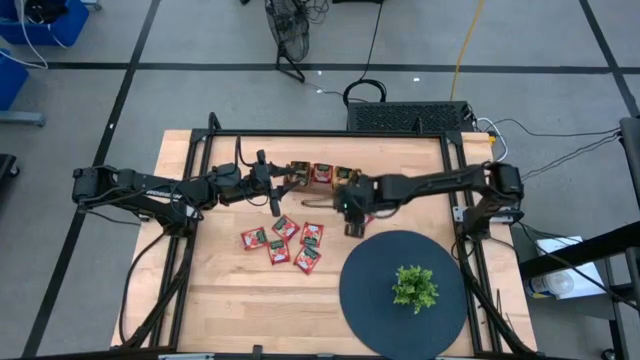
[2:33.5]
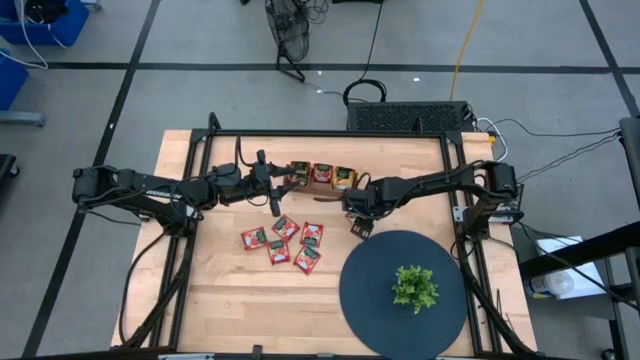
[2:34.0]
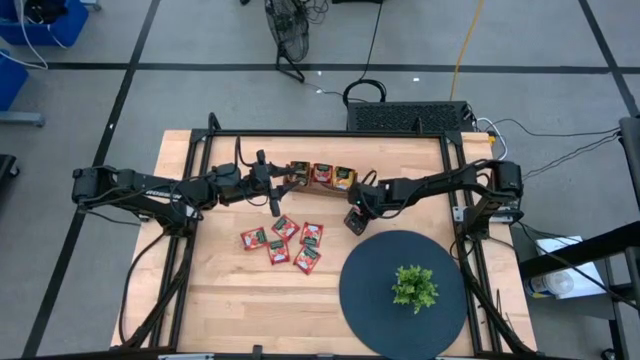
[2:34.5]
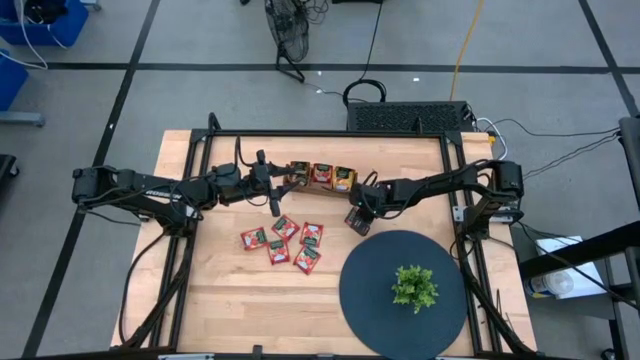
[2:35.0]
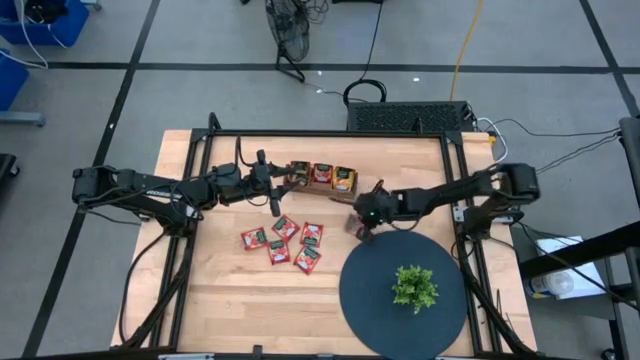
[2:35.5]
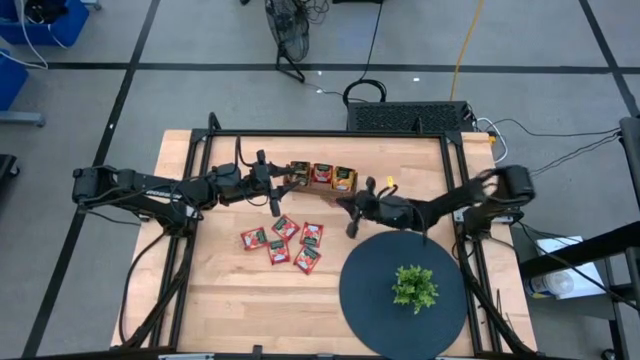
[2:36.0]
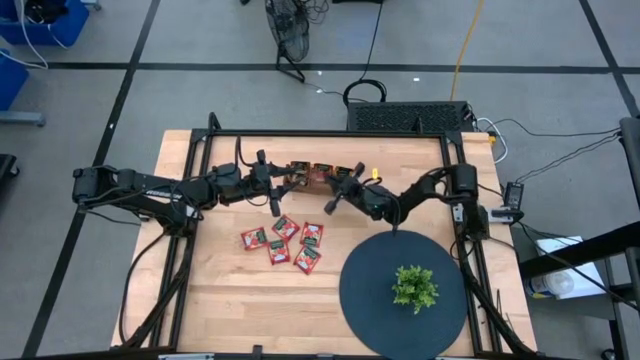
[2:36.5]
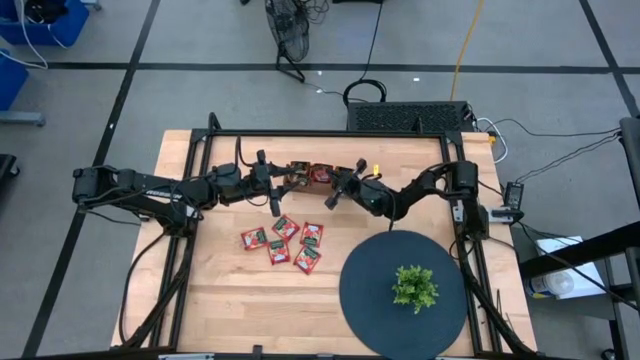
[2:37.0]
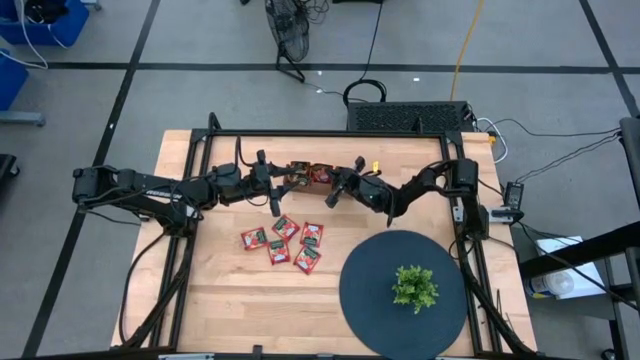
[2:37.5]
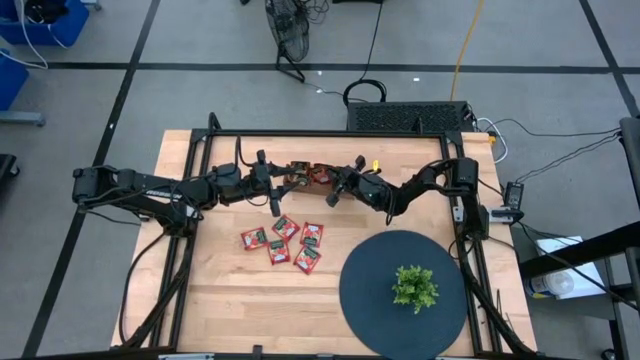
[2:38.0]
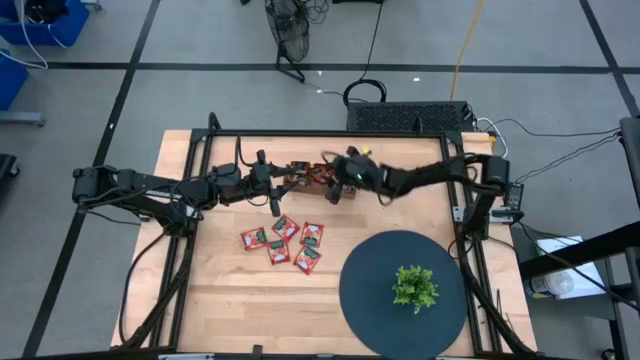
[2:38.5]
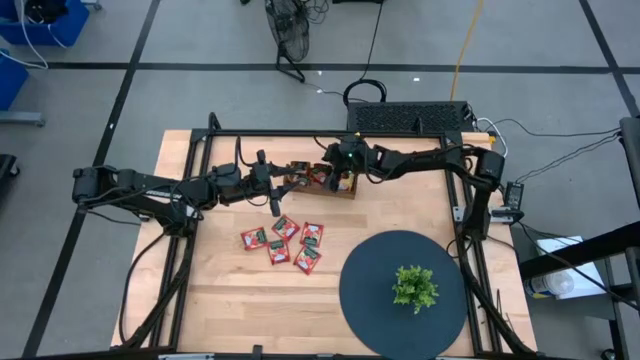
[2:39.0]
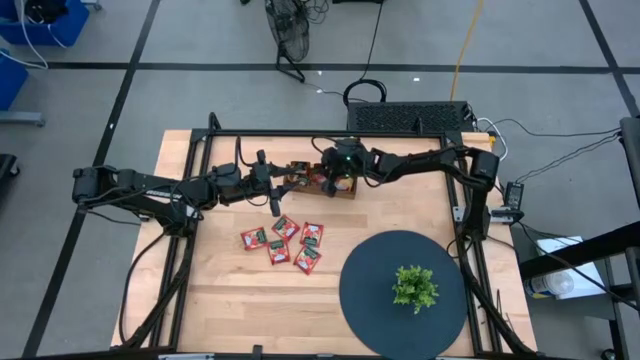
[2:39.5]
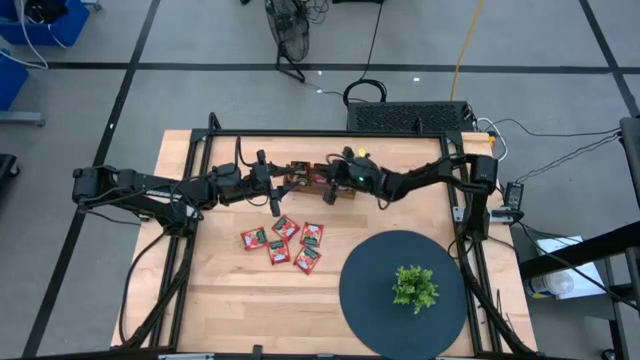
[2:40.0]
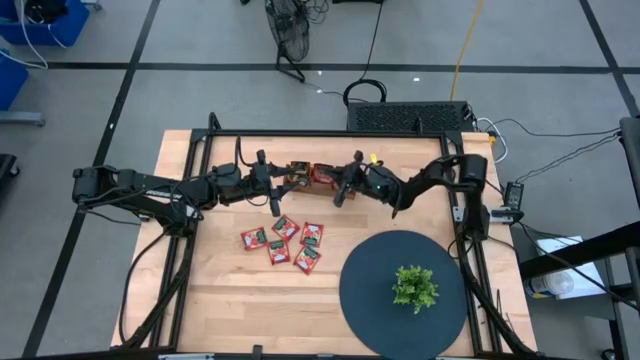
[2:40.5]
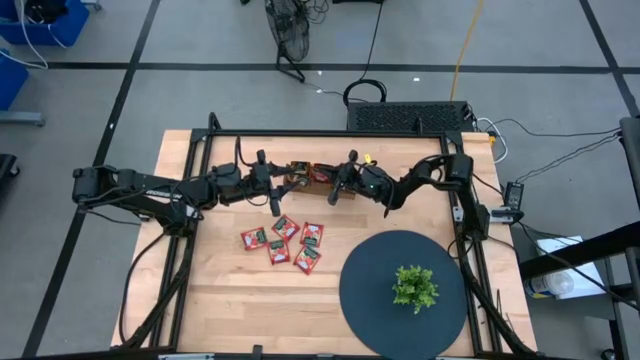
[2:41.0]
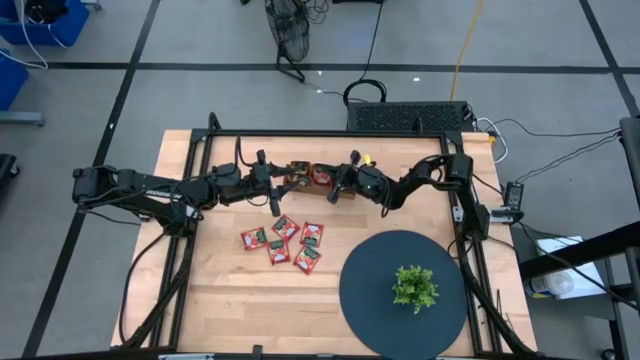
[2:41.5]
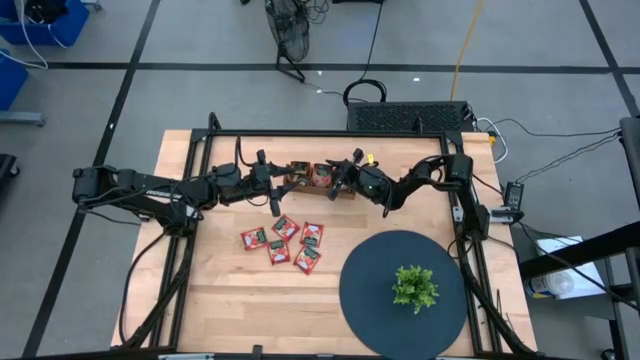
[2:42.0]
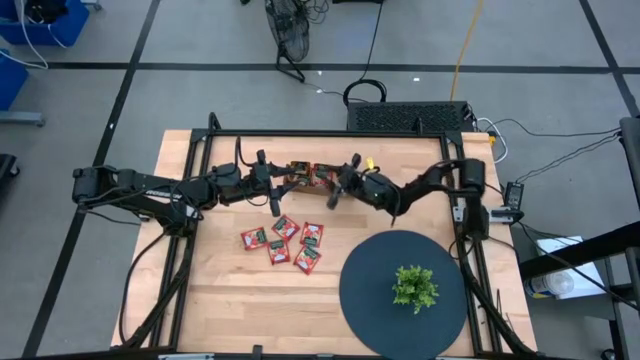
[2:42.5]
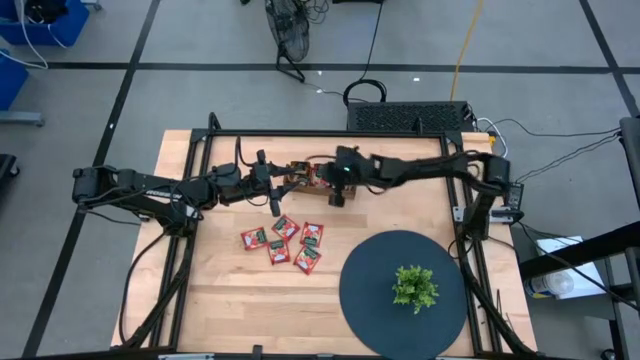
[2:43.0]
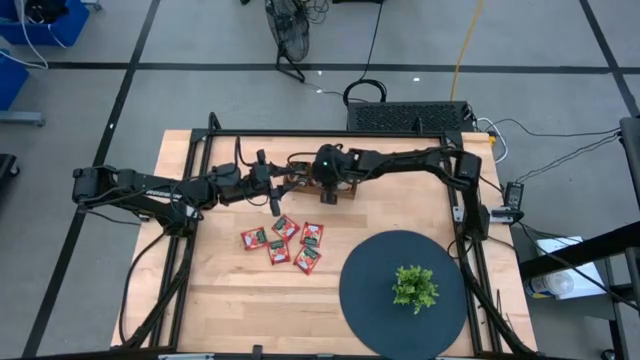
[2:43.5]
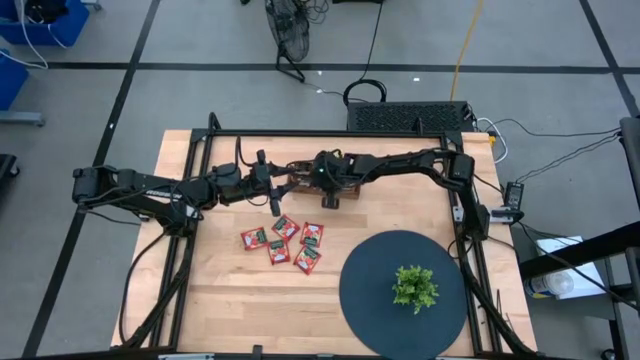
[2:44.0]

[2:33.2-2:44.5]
Task: Pick & Place Tea
Put the red tea bag into the middle section wooden organizer

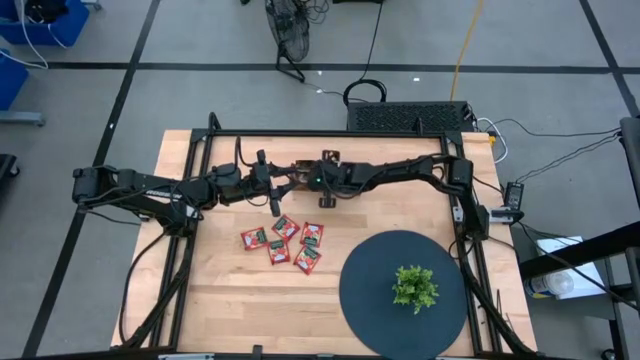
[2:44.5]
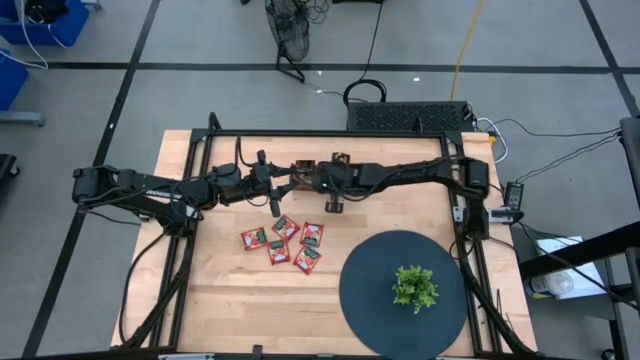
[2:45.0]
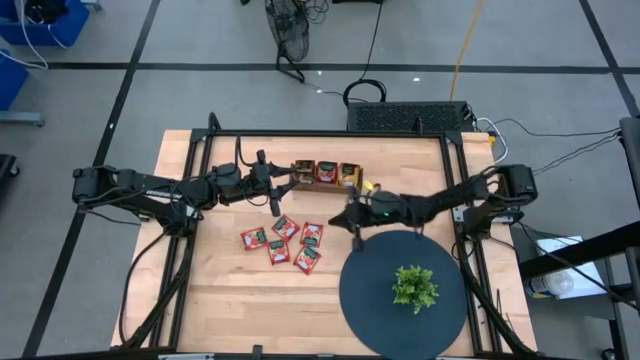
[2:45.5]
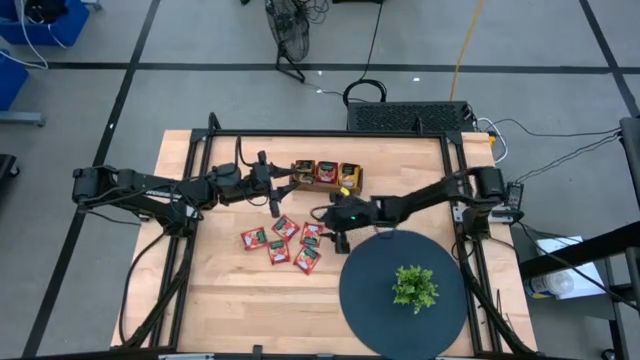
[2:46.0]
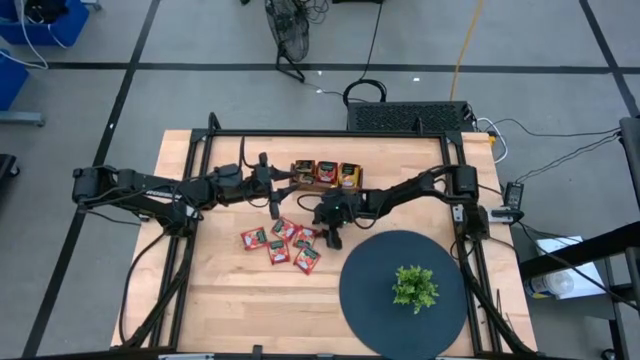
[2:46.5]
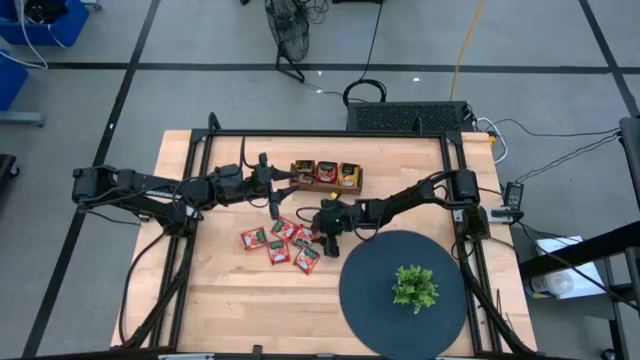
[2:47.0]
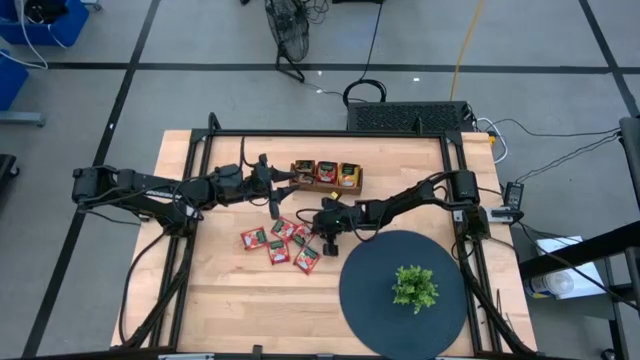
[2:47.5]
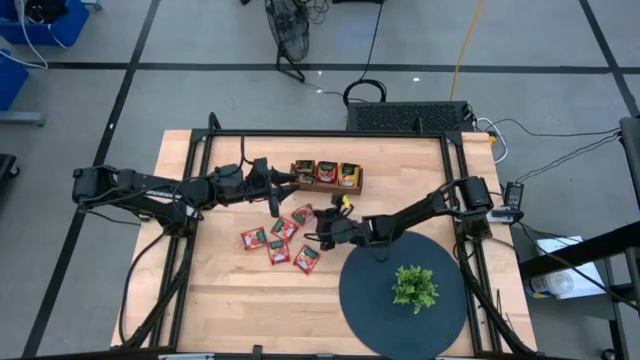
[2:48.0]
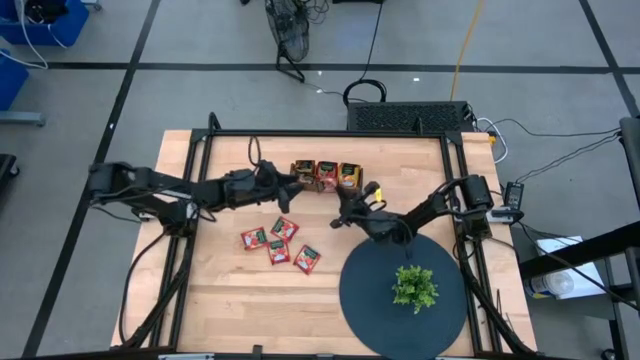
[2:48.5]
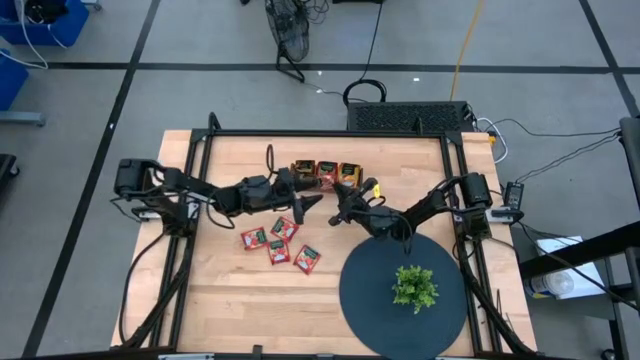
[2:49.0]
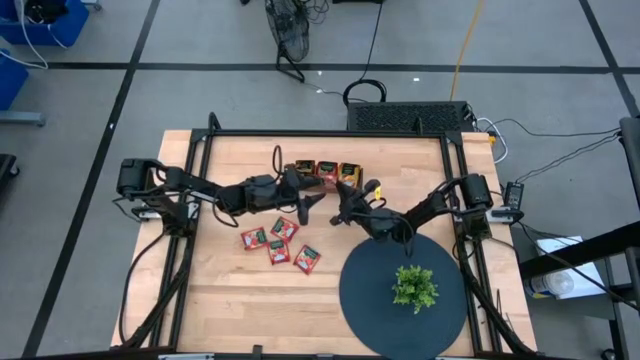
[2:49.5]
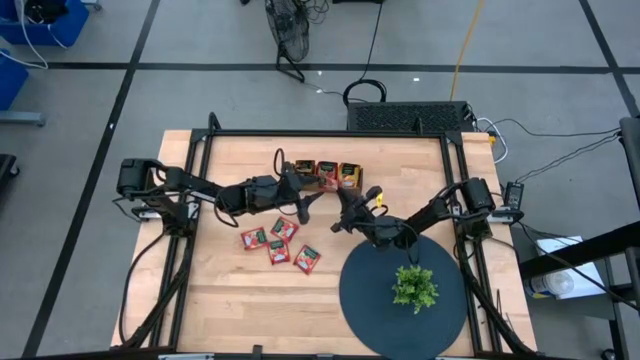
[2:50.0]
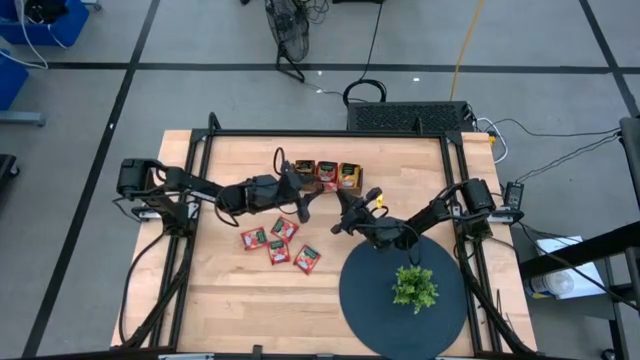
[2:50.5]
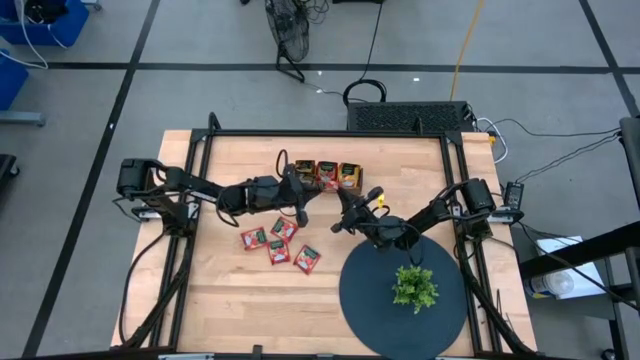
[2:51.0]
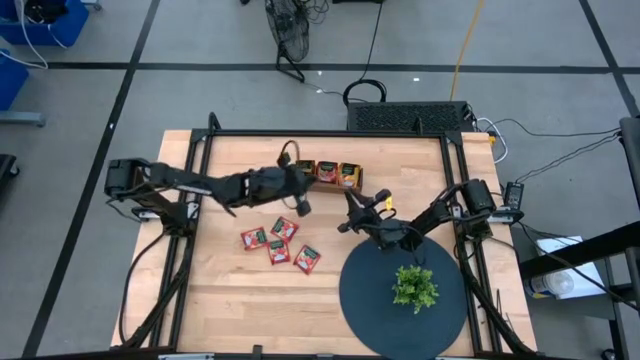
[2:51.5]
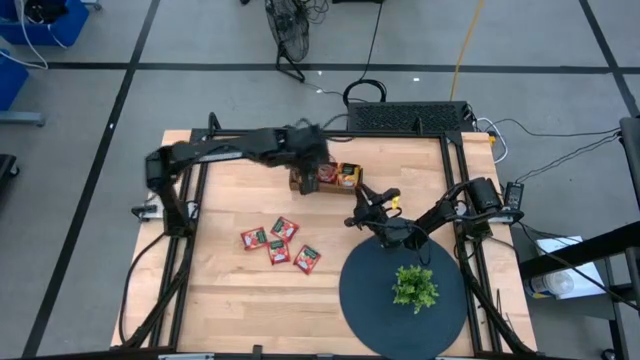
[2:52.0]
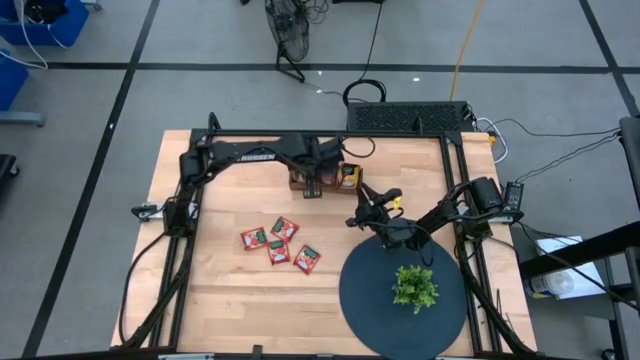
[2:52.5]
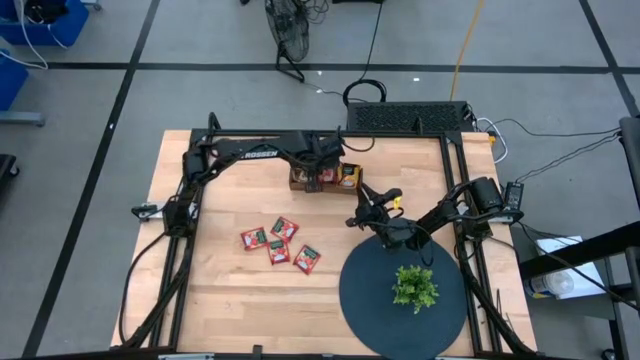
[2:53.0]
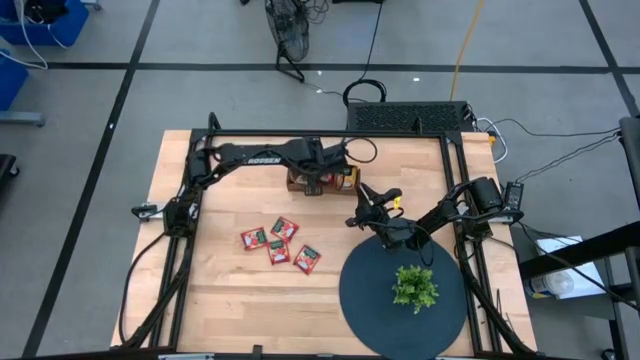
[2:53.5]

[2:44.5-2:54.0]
Put the red tea bag into the middle section wooden organizer
